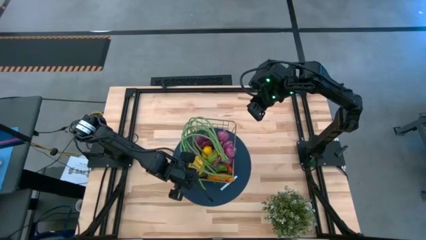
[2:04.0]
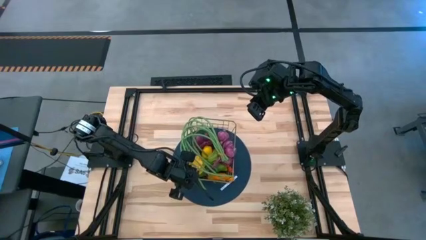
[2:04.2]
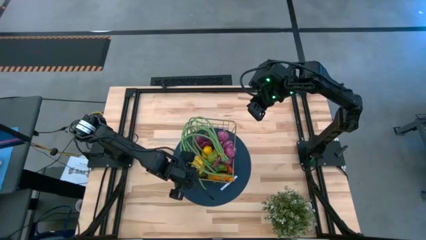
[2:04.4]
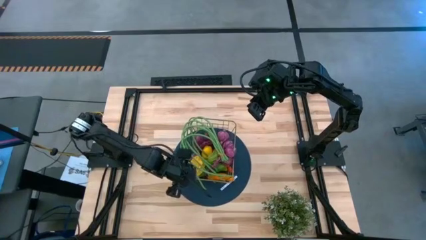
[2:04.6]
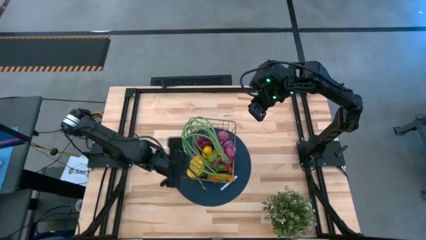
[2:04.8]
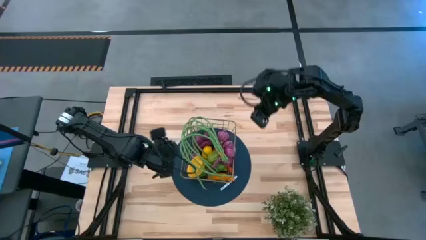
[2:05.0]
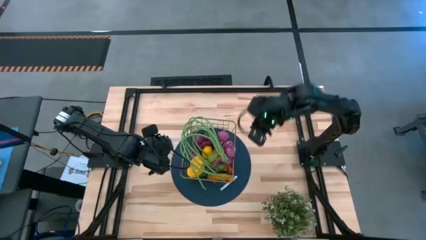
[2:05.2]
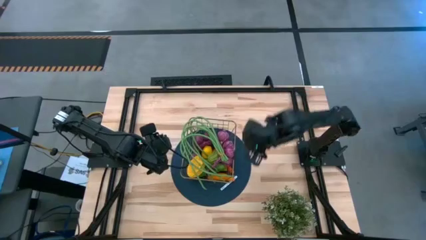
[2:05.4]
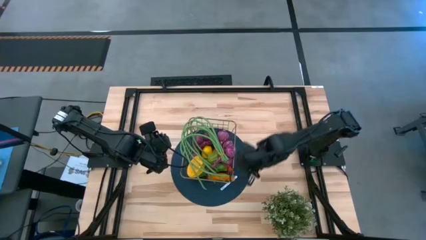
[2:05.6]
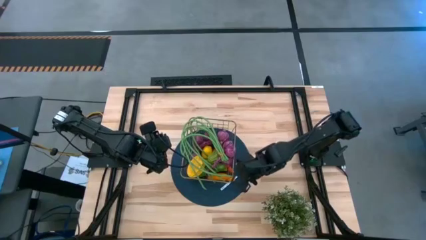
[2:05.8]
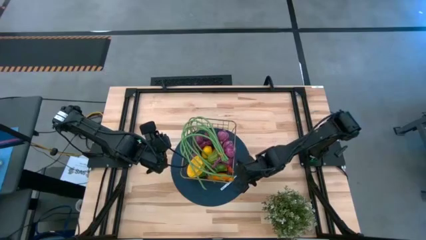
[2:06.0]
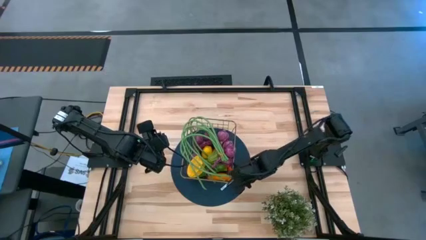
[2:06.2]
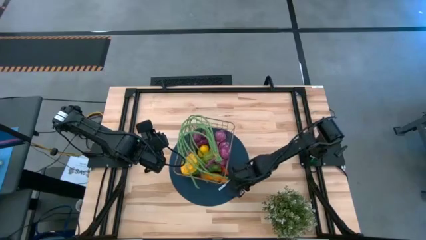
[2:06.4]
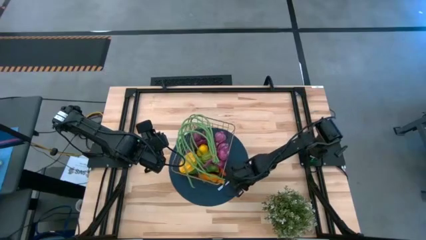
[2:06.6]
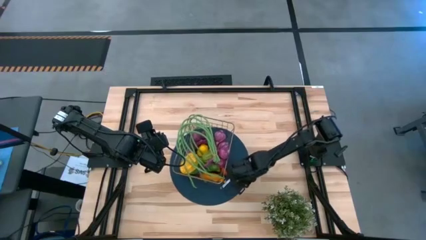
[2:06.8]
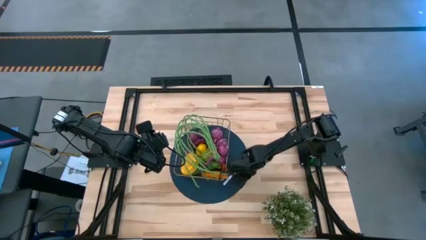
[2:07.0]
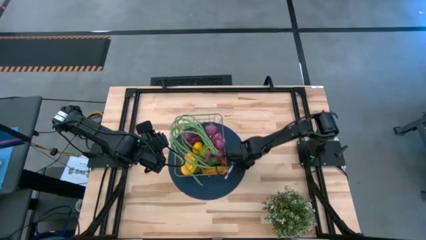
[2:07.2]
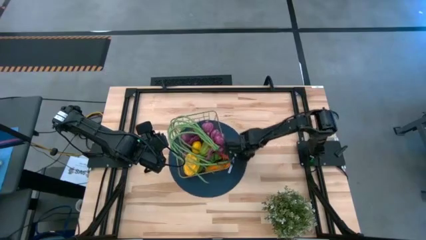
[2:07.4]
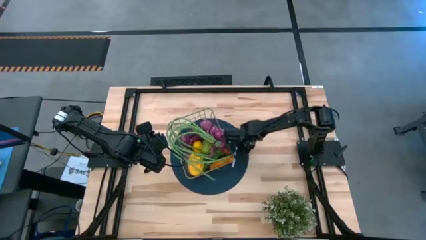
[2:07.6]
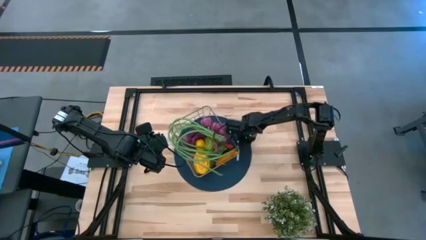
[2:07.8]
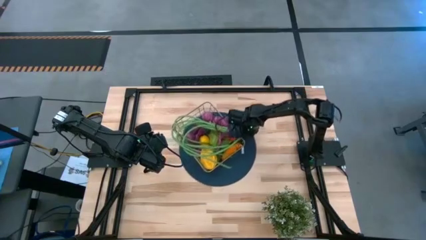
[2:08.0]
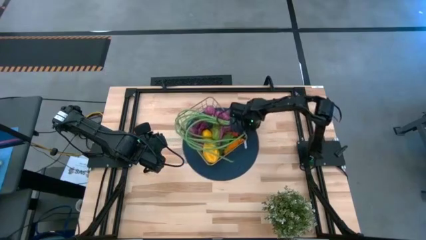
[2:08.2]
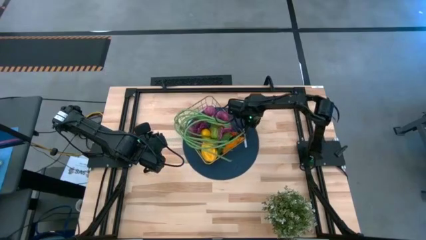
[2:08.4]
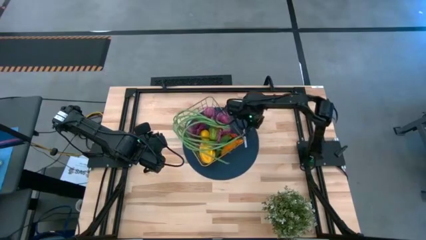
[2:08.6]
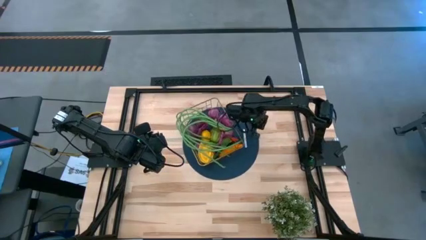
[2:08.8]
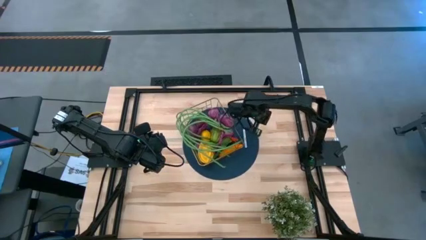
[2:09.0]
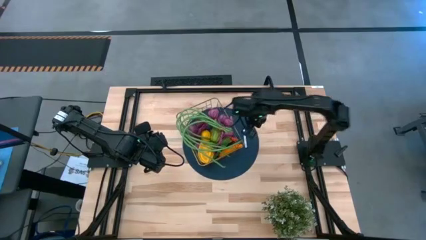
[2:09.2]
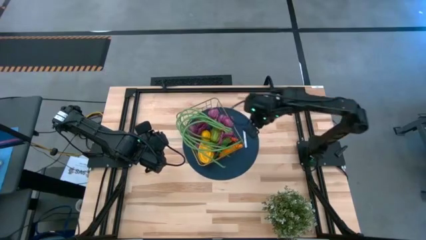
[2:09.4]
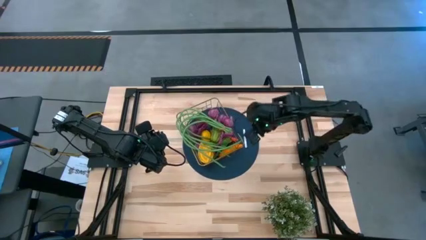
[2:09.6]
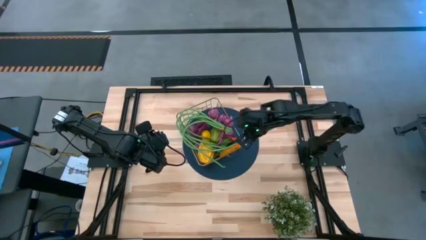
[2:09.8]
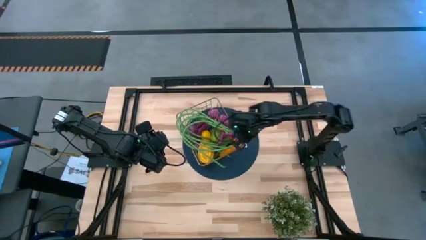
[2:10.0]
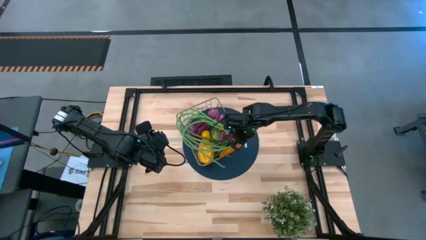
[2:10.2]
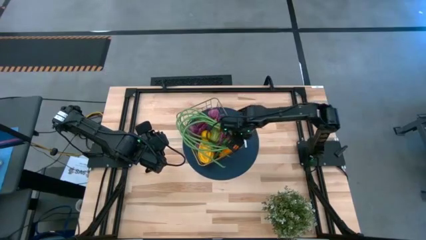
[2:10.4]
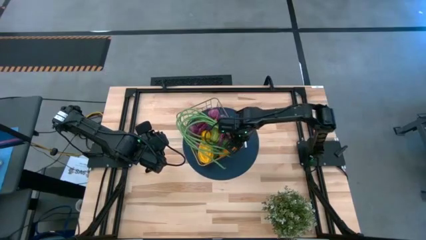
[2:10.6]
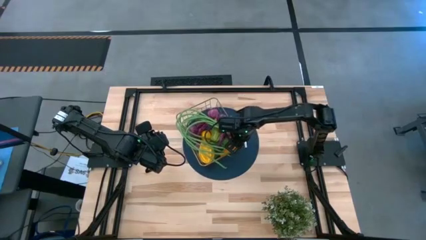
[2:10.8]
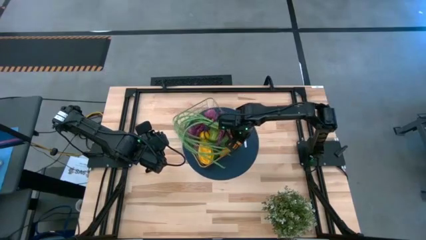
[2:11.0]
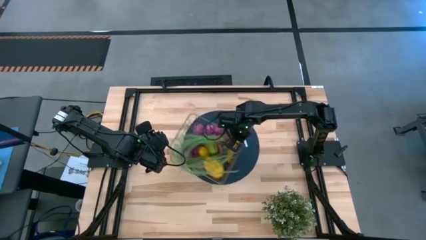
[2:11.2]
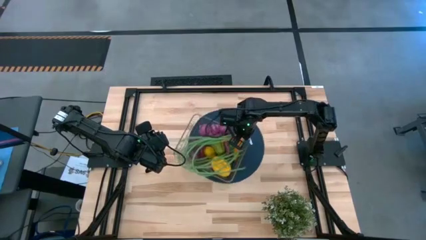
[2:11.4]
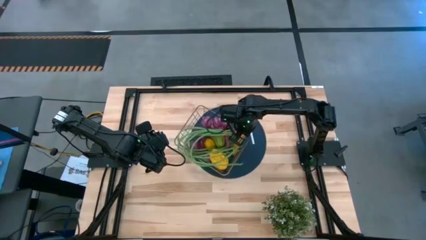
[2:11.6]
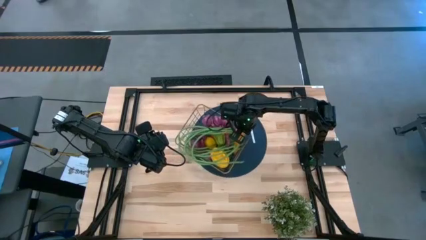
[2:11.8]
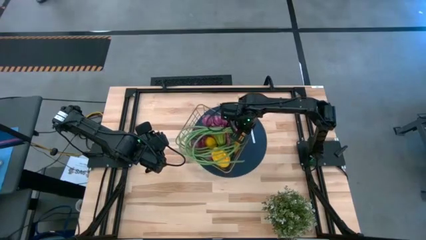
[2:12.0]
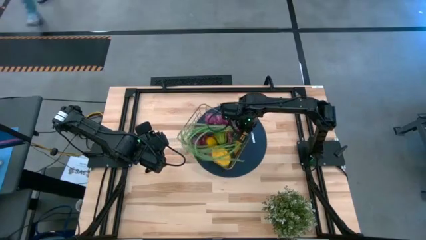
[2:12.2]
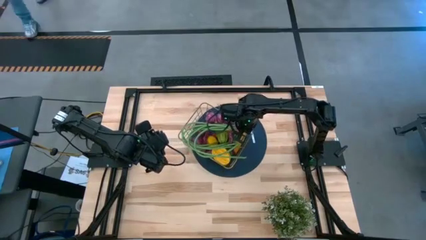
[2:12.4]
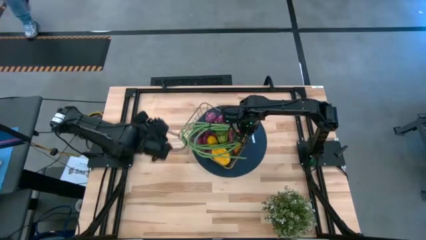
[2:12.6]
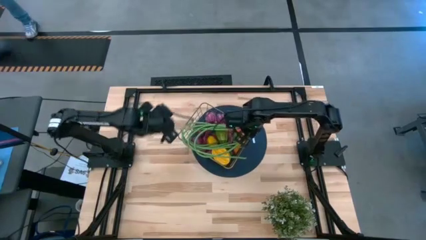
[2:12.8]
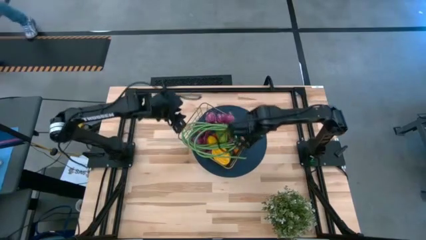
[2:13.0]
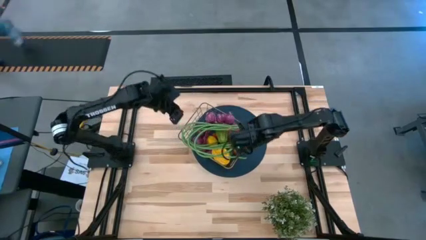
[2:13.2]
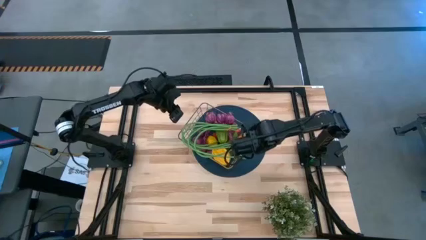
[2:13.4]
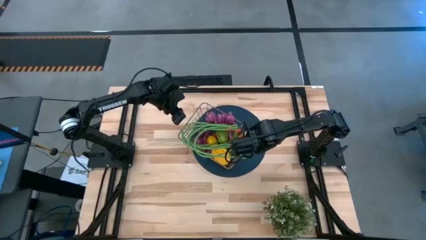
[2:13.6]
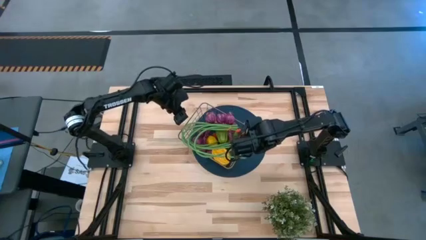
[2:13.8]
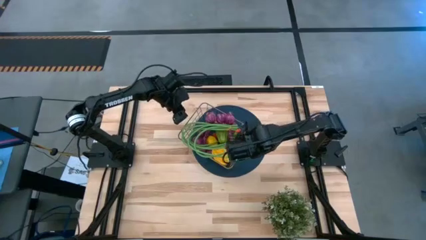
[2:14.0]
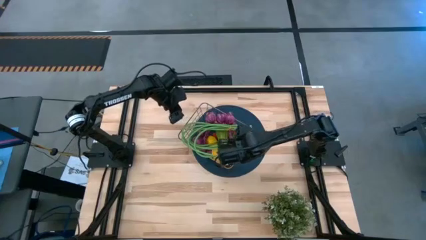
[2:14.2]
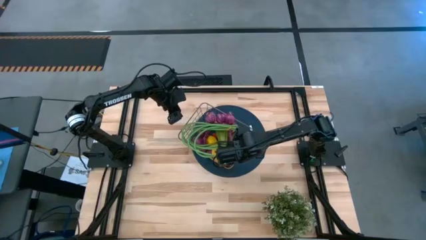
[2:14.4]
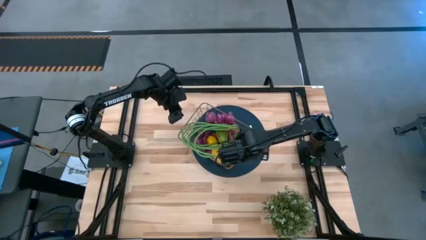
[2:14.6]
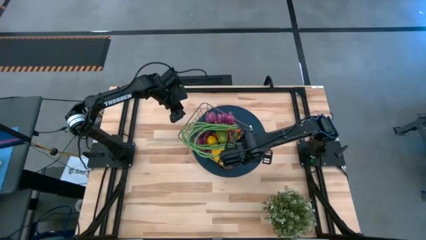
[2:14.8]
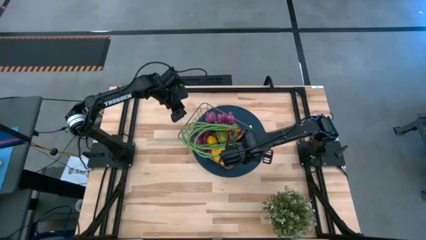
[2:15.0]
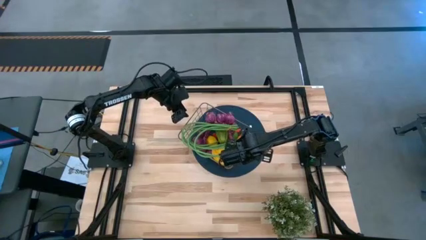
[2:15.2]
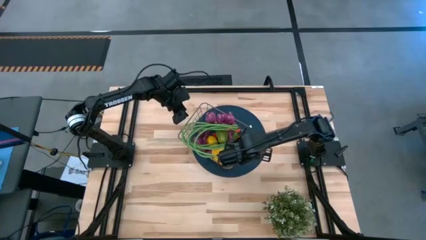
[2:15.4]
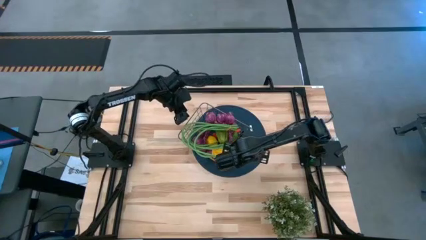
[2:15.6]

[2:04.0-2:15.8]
Task: Build produce basket
Move the basket to the center
